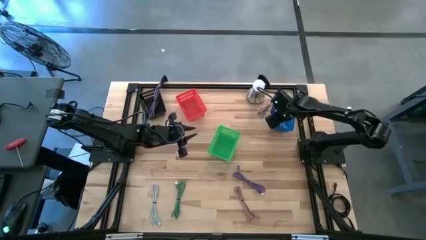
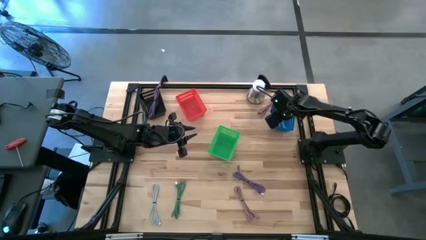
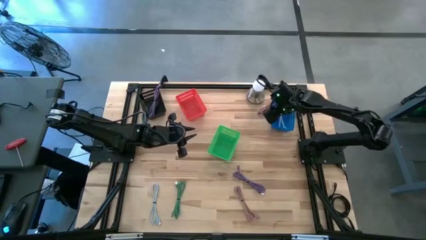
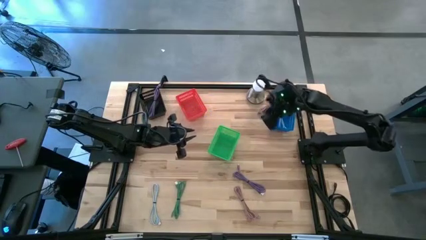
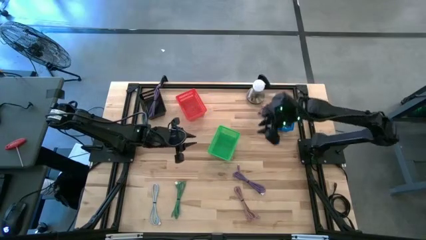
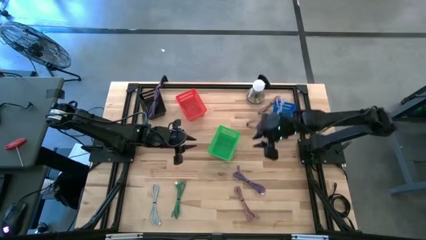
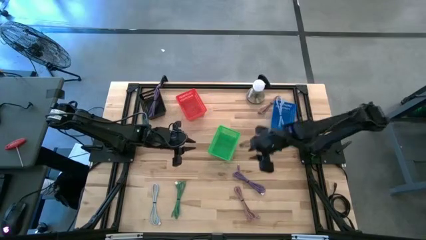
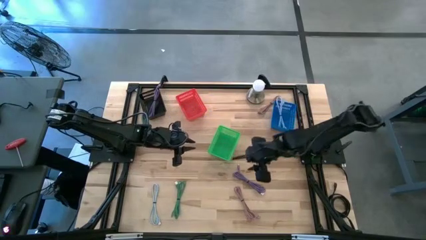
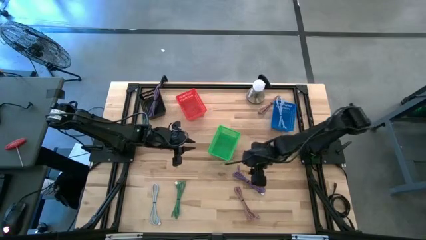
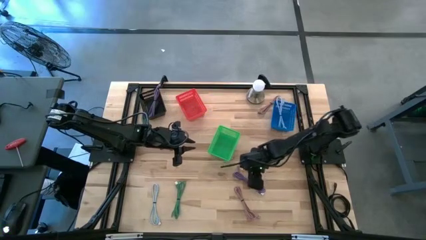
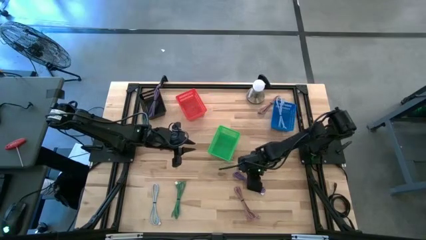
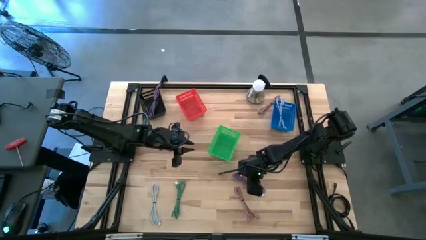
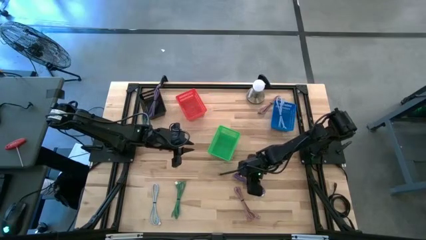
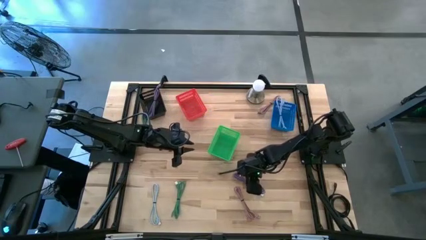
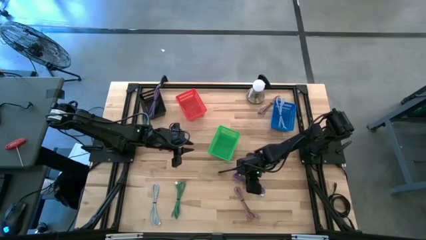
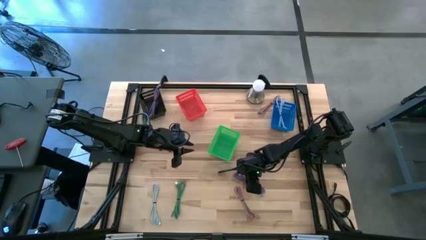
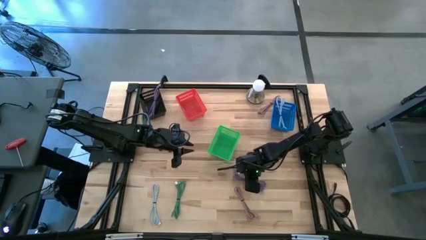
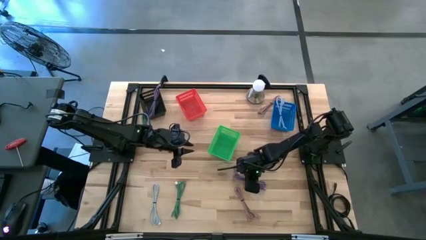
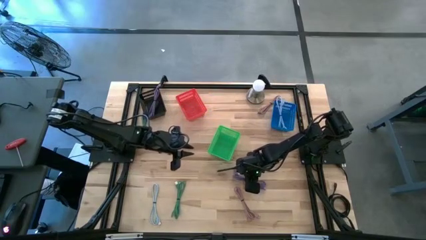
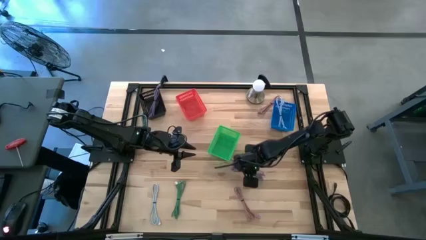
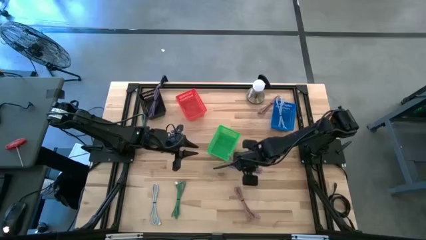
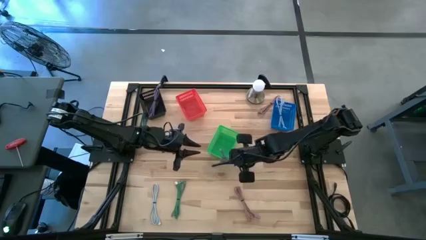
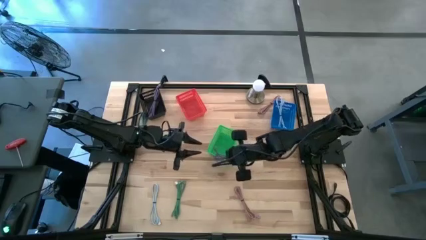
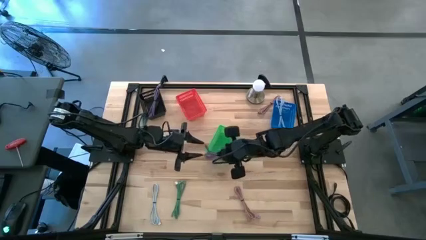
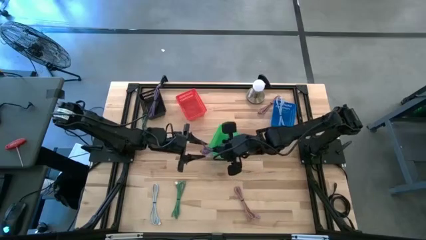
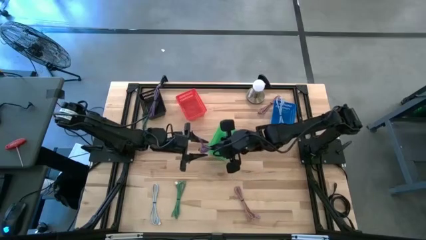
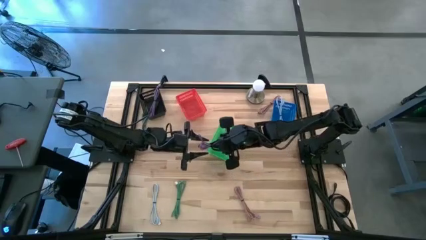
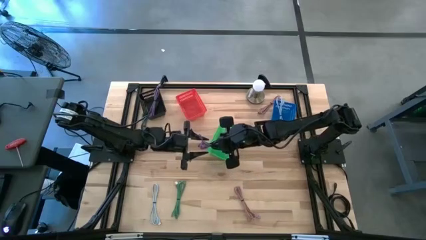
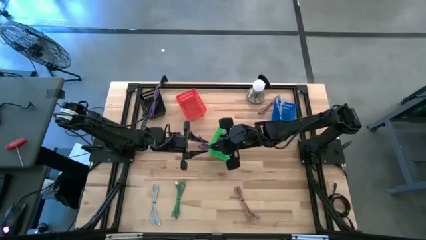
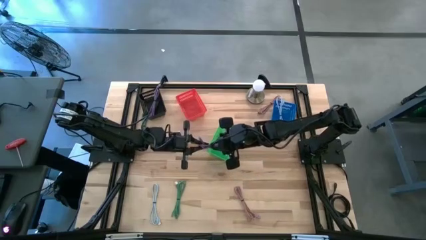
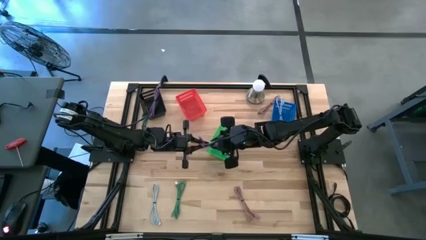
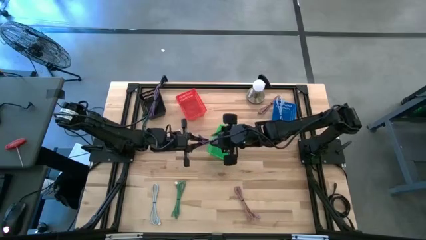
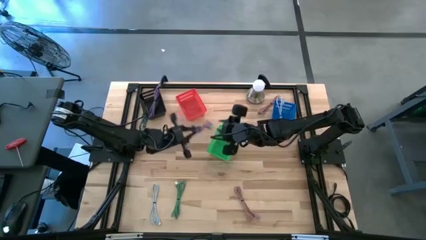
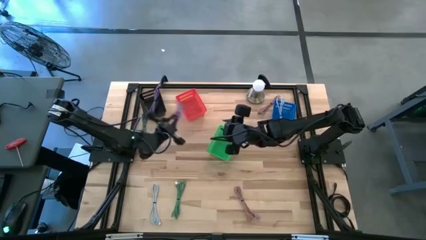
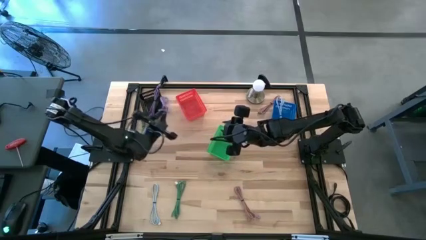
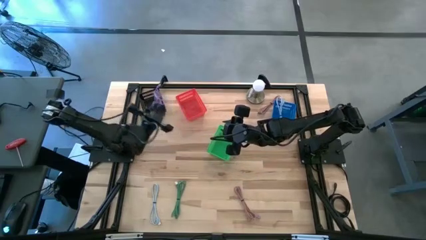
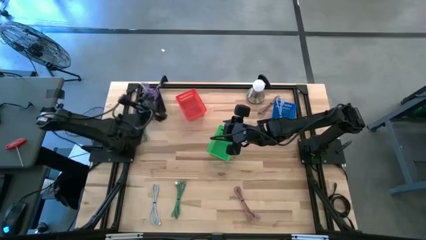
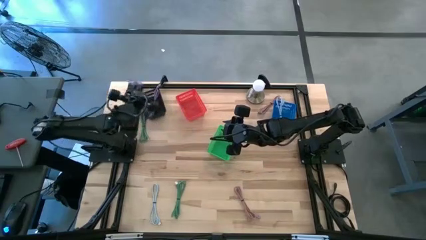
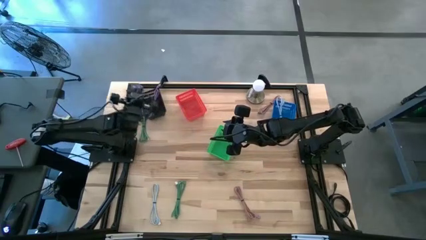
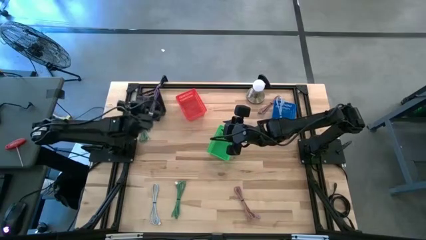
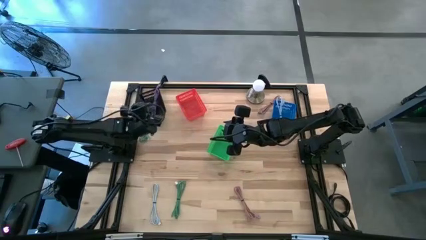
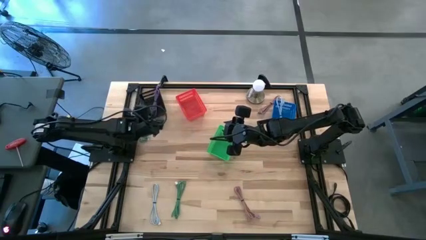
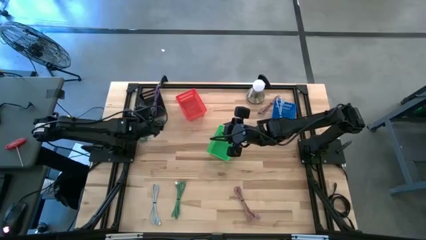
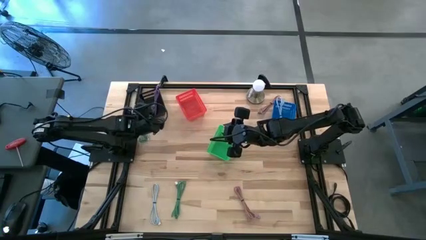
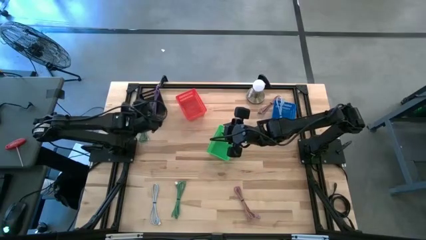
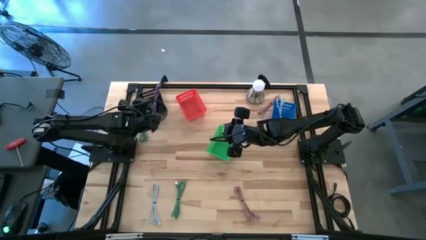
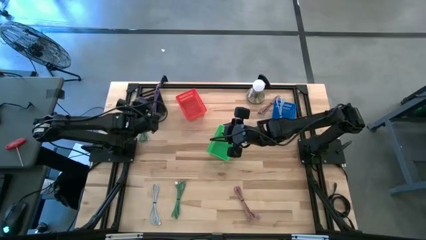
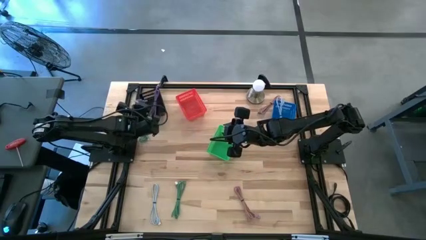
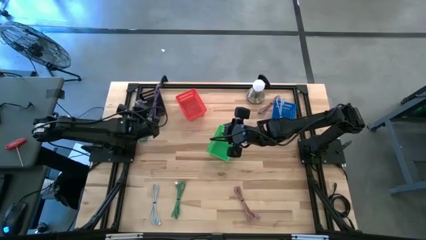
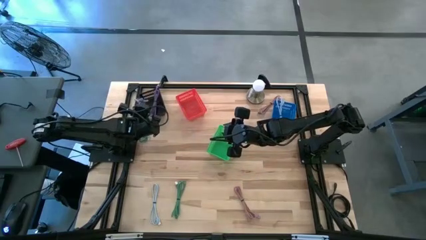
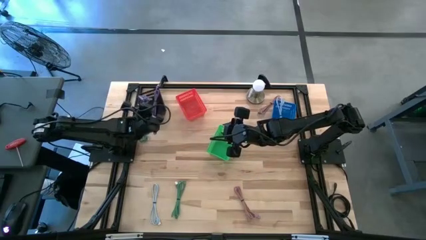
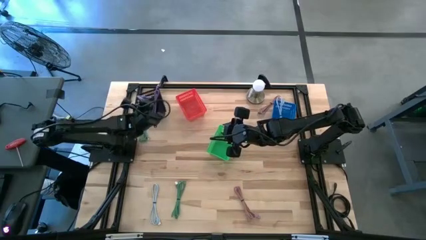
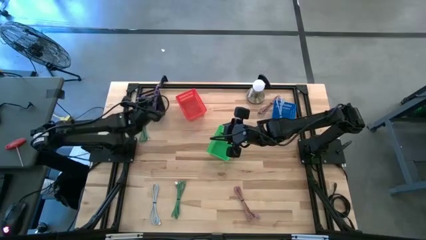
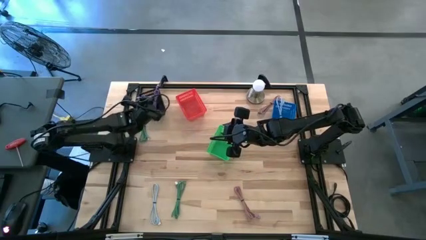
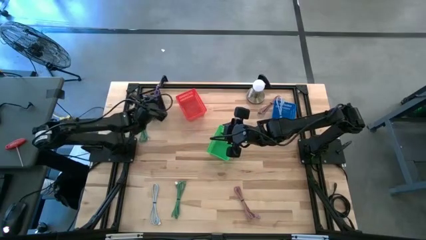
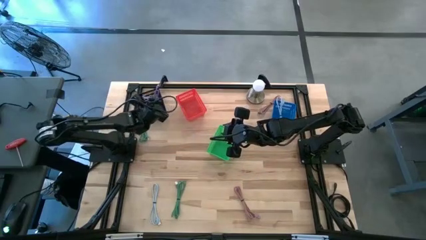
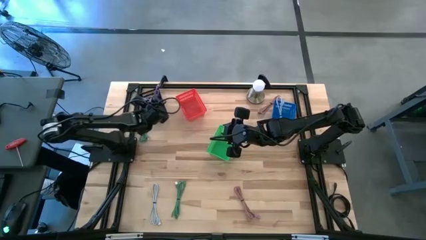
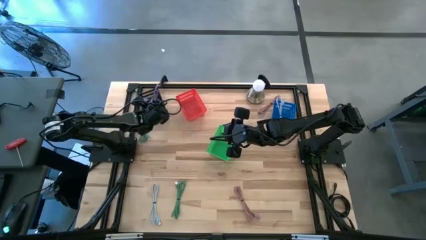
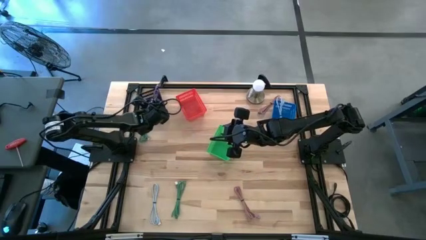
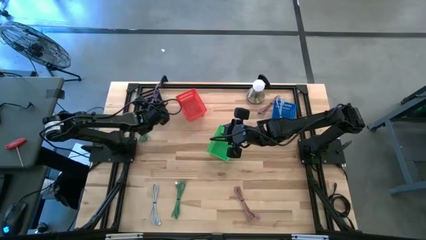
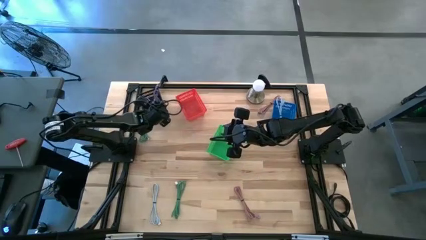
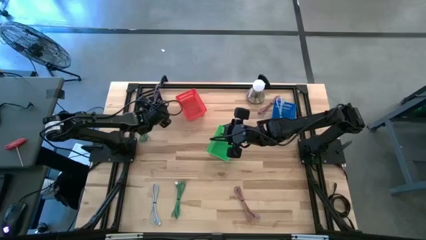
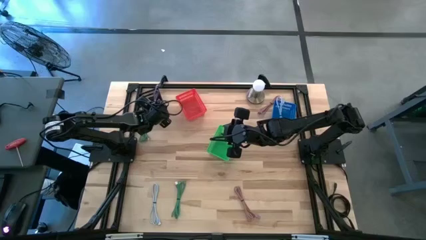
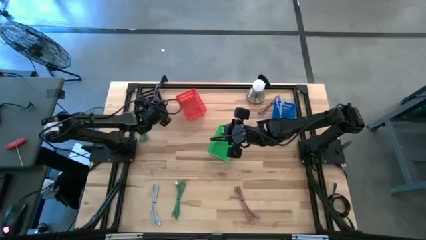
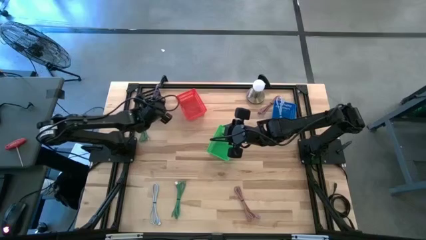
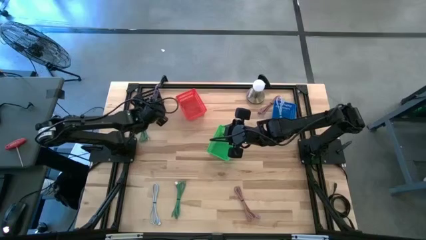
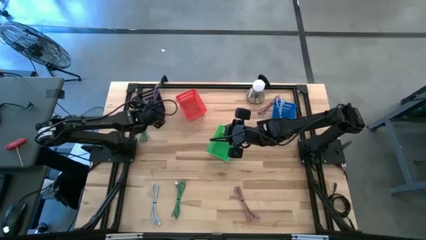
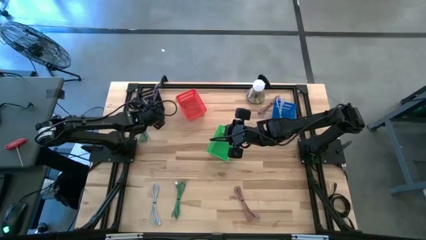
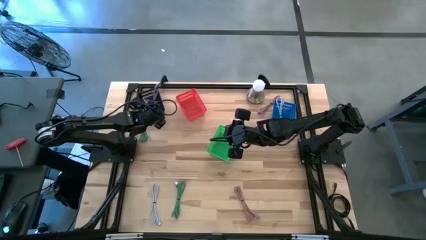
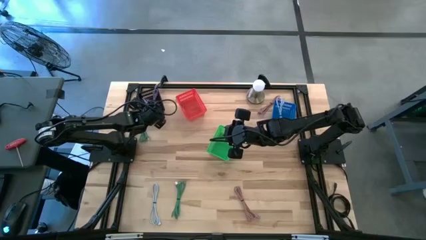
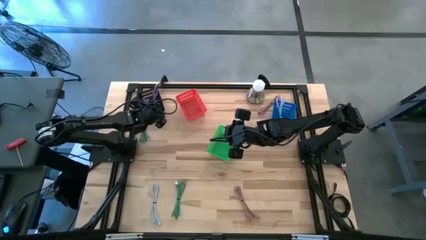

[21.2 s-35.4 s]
Task: Pick & Place USB Port
Put the violet charger cable into the black basket

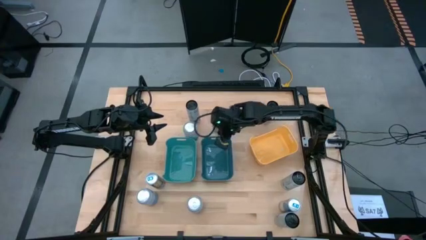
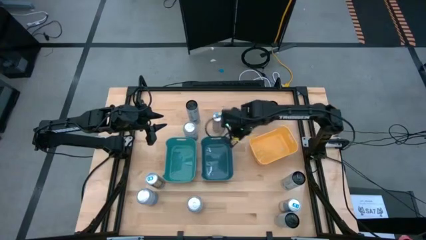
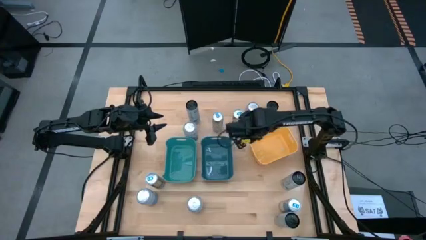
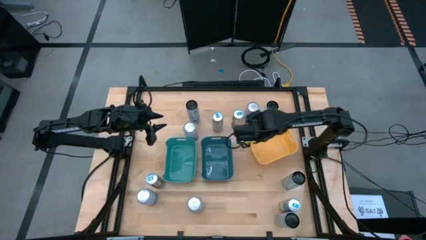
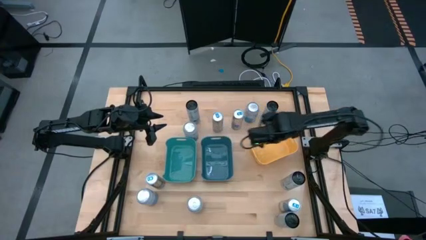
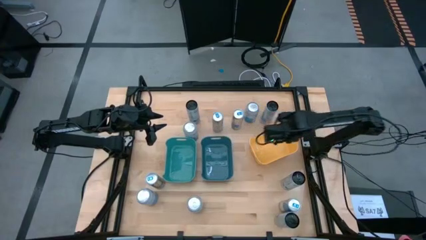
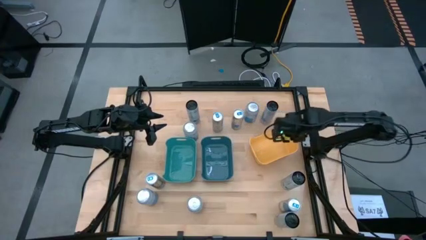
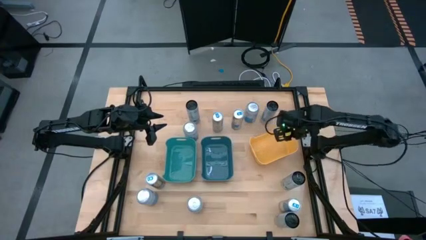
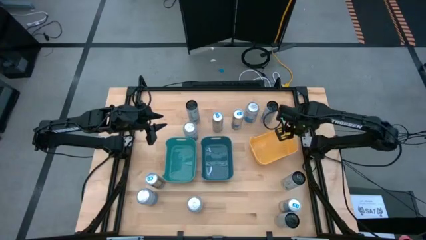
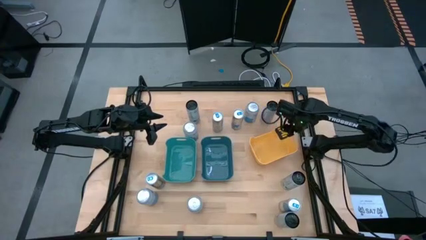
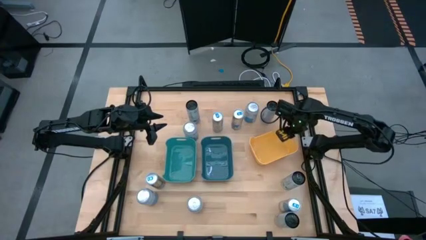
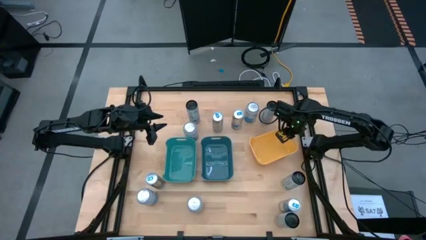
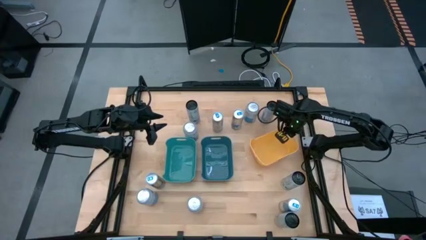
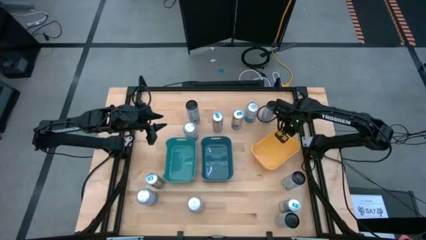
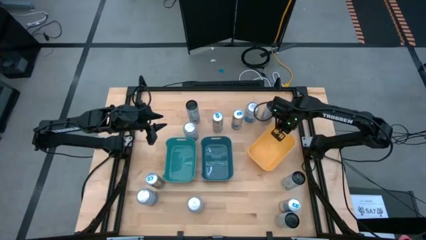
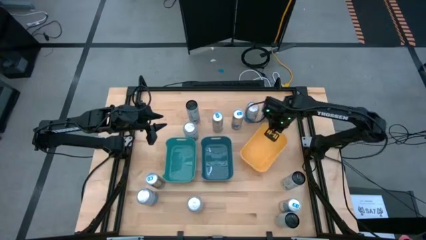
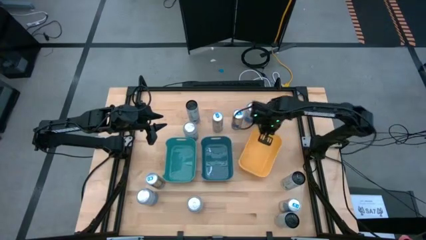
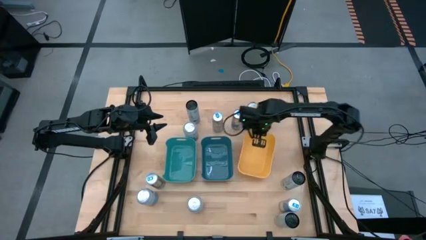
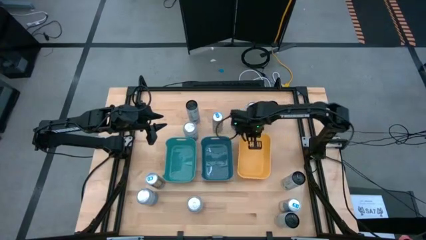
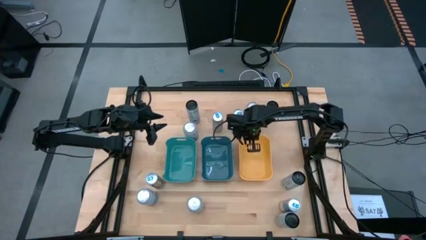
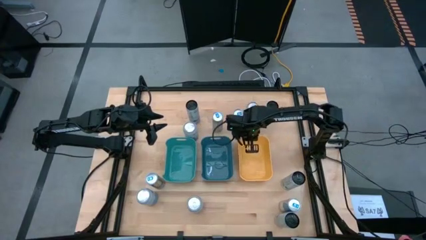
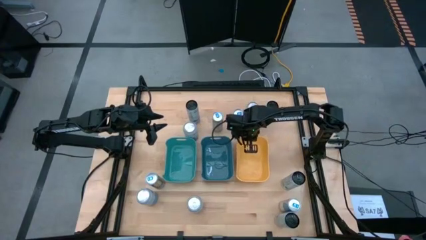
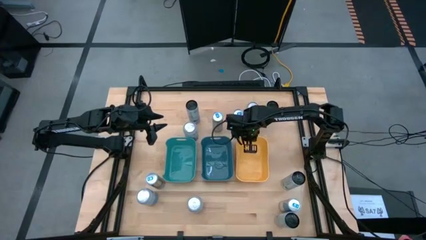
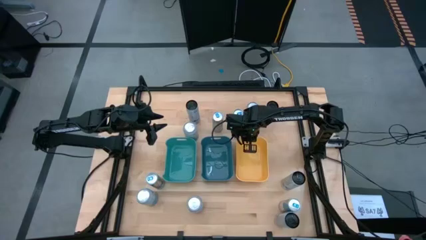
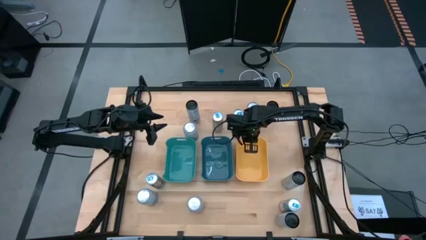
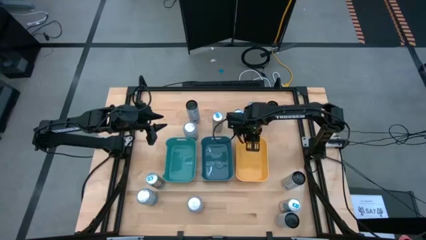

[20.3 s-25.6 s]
Task: Sort soda cans
Move the yellow bin to the middle right of the table
